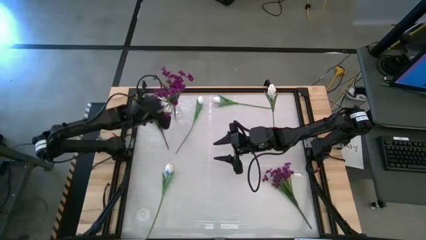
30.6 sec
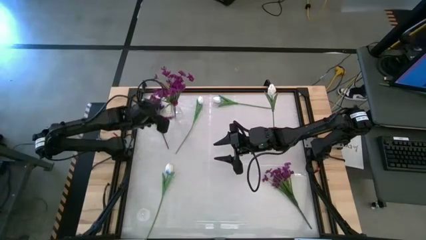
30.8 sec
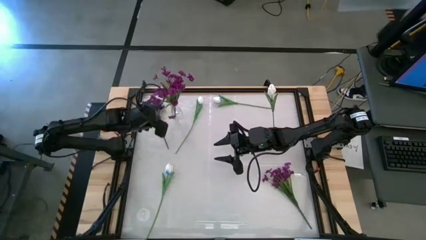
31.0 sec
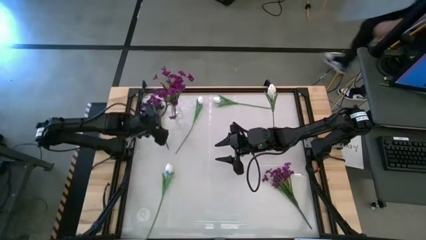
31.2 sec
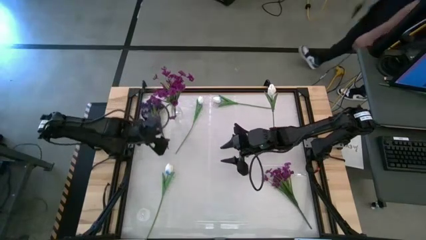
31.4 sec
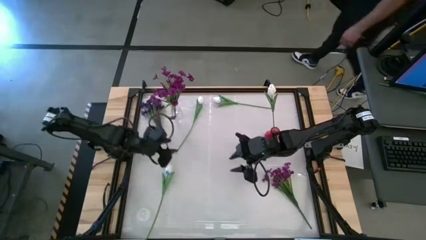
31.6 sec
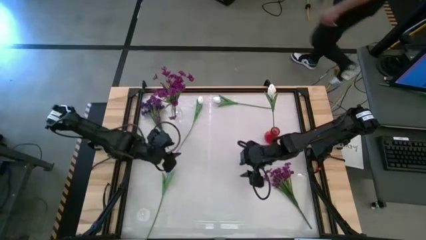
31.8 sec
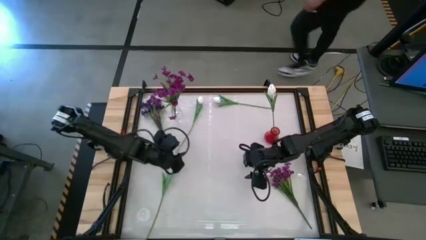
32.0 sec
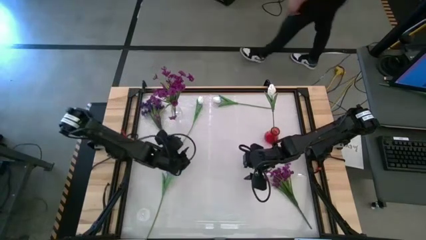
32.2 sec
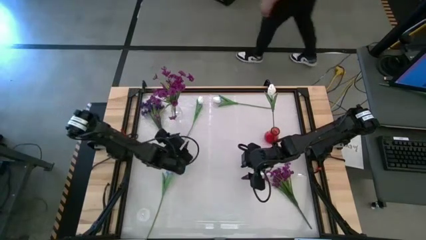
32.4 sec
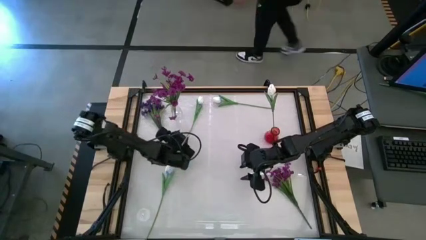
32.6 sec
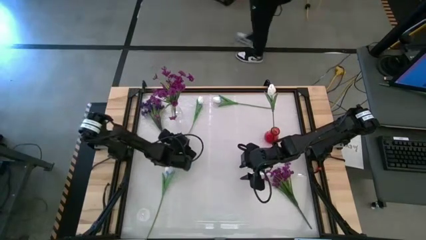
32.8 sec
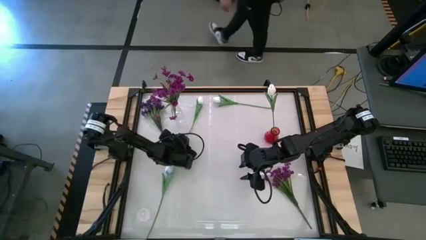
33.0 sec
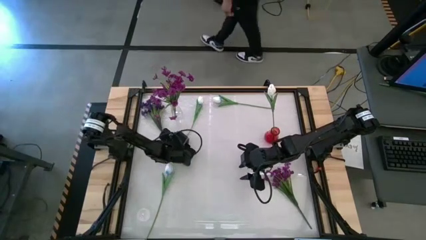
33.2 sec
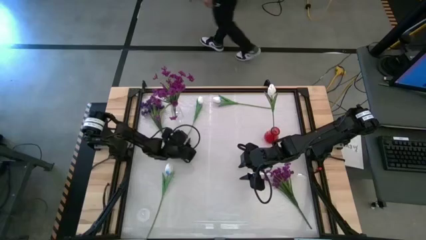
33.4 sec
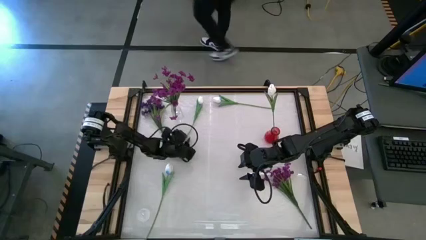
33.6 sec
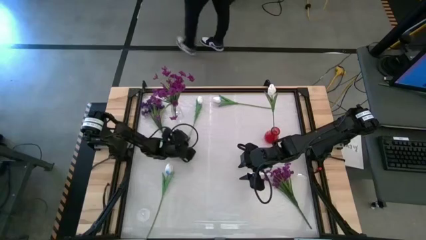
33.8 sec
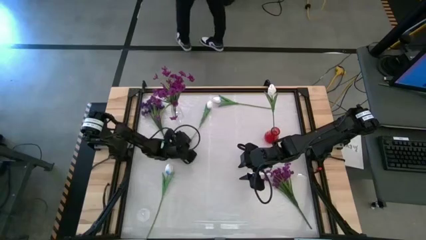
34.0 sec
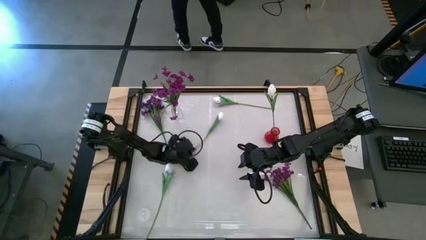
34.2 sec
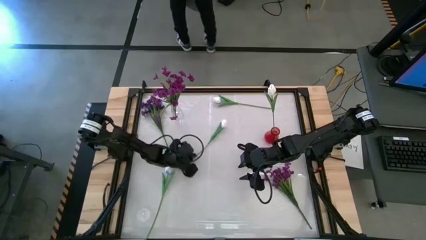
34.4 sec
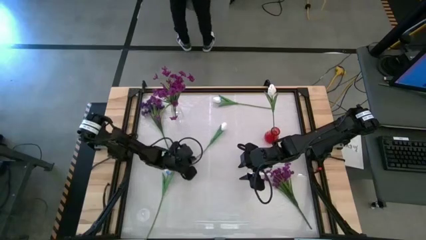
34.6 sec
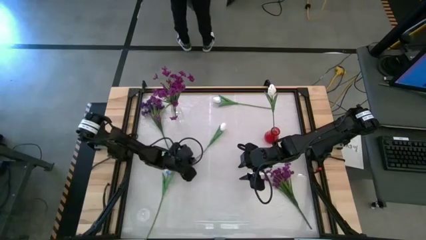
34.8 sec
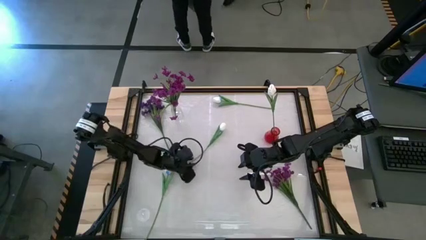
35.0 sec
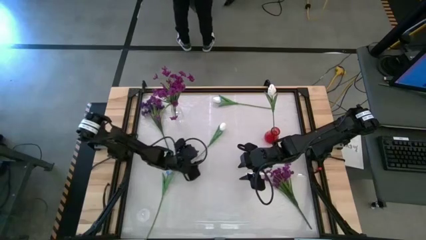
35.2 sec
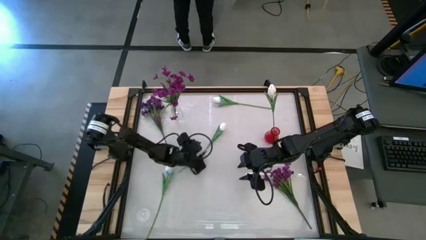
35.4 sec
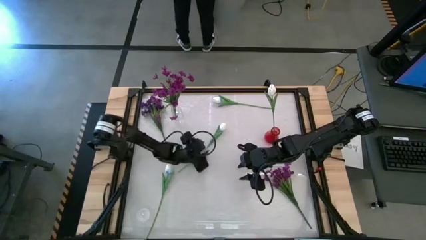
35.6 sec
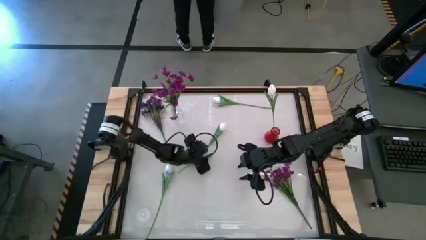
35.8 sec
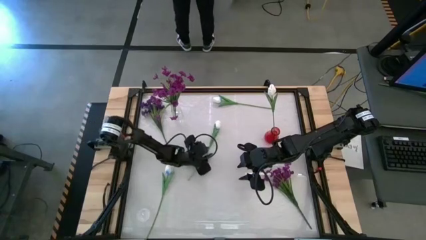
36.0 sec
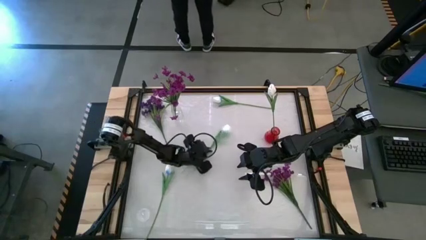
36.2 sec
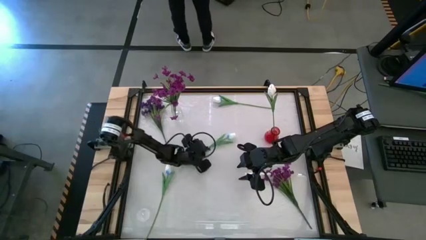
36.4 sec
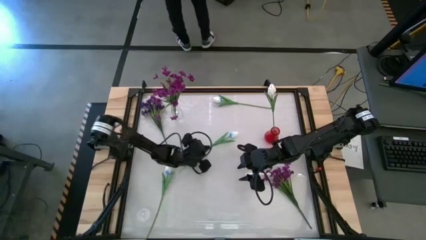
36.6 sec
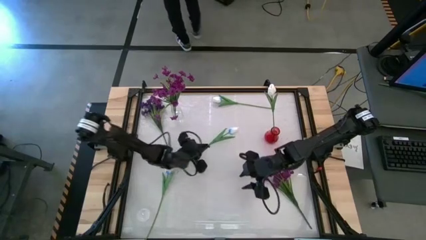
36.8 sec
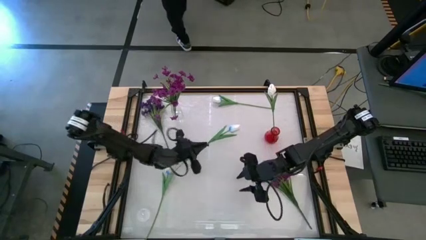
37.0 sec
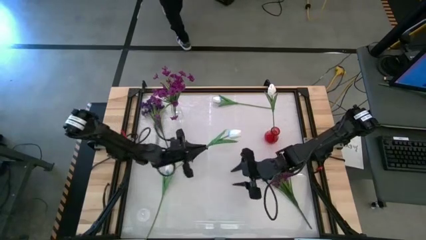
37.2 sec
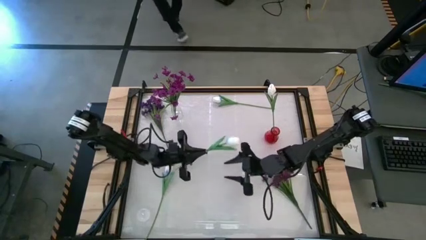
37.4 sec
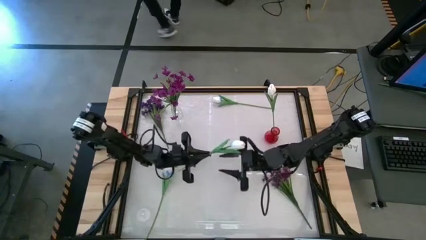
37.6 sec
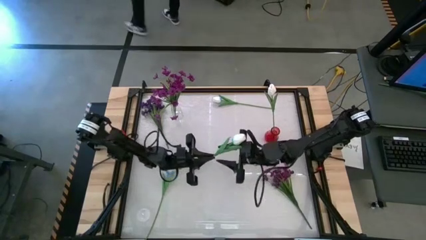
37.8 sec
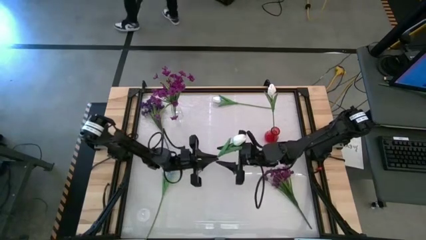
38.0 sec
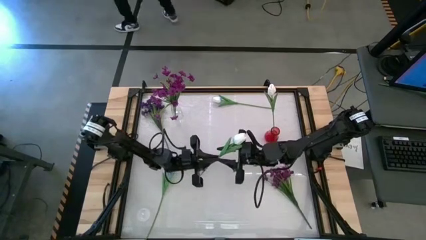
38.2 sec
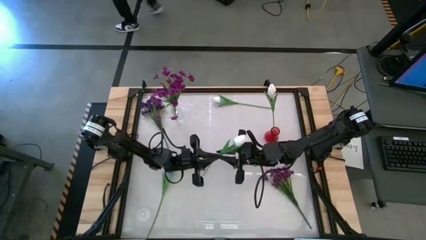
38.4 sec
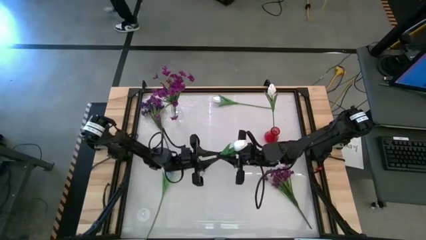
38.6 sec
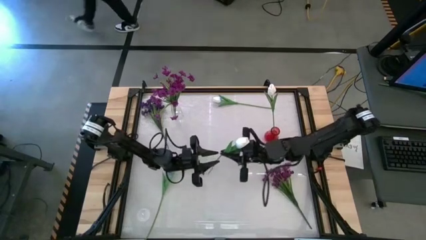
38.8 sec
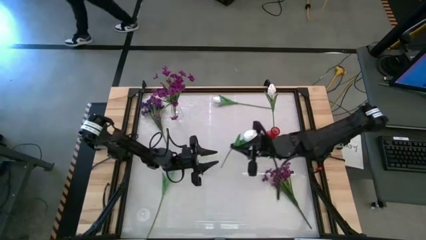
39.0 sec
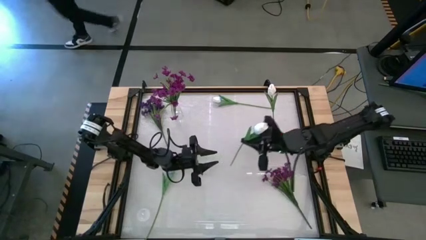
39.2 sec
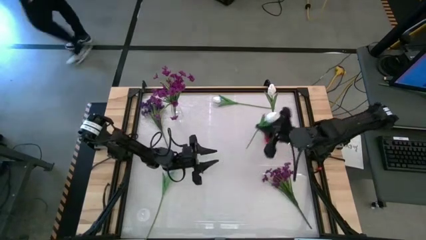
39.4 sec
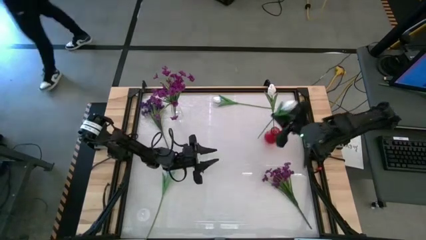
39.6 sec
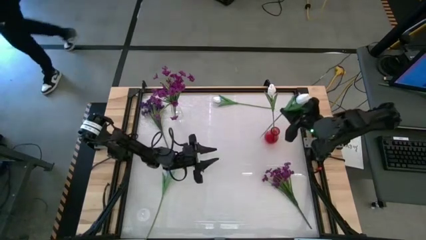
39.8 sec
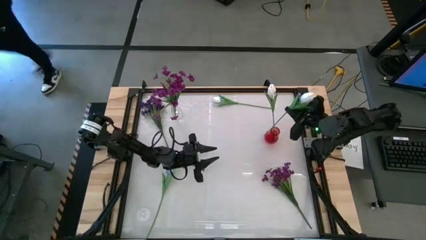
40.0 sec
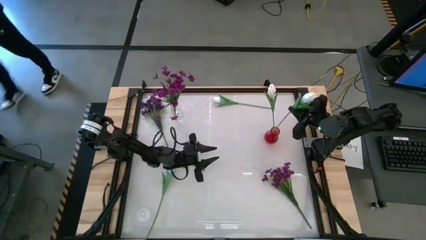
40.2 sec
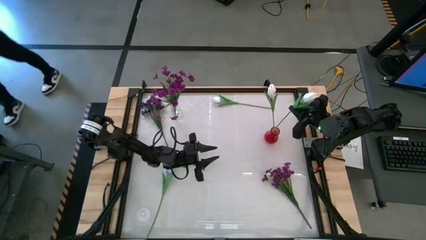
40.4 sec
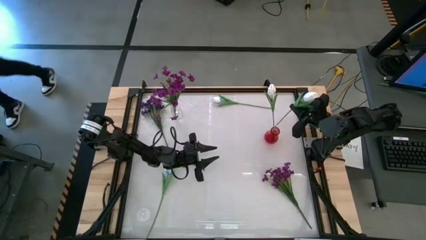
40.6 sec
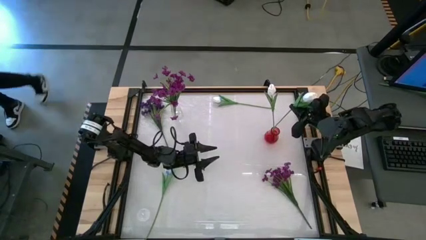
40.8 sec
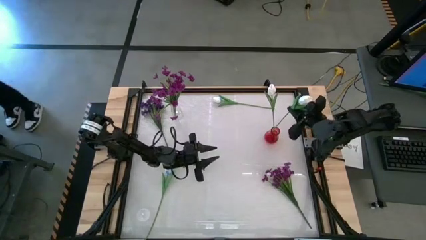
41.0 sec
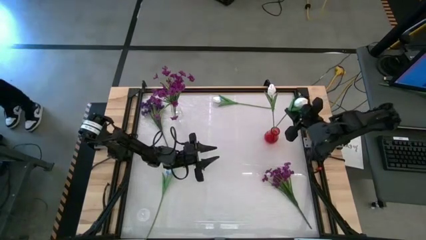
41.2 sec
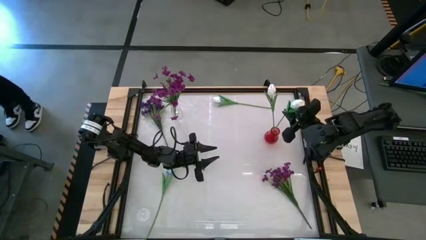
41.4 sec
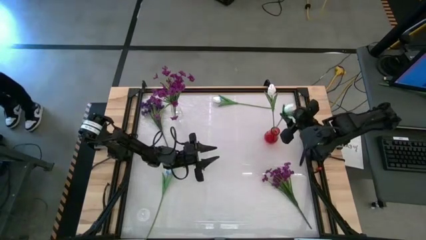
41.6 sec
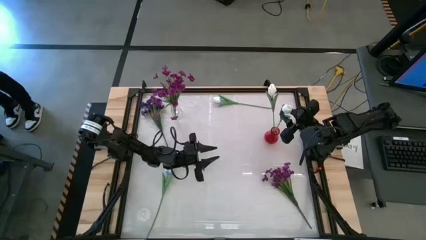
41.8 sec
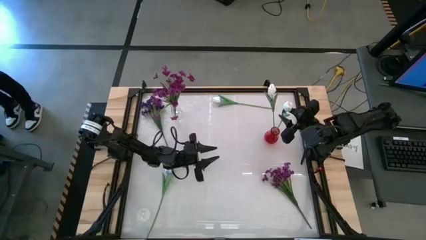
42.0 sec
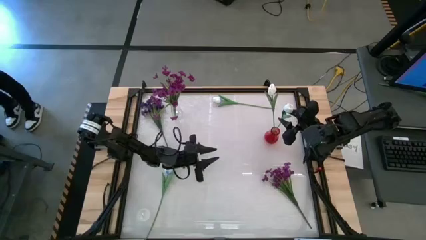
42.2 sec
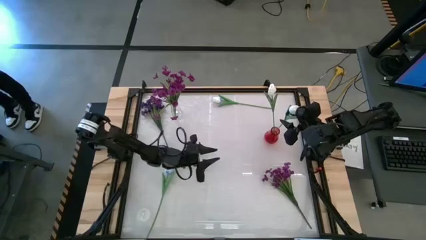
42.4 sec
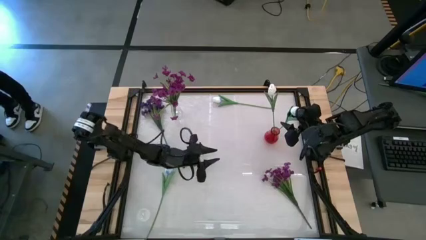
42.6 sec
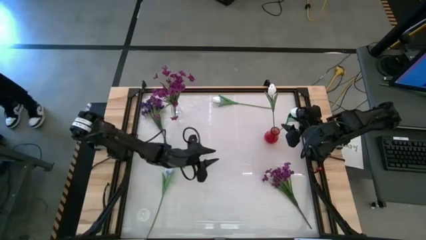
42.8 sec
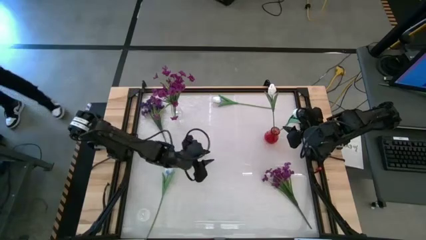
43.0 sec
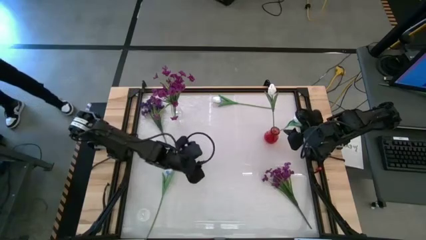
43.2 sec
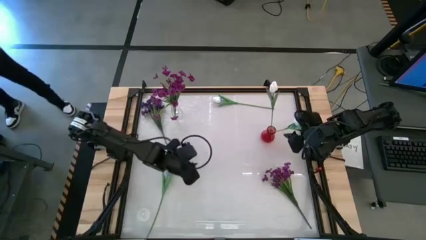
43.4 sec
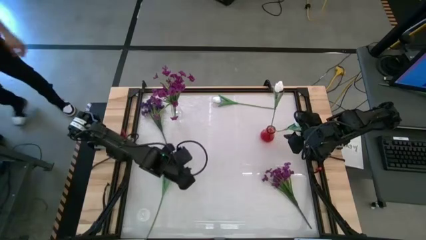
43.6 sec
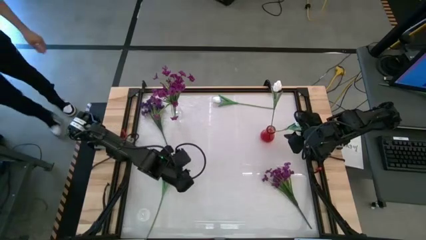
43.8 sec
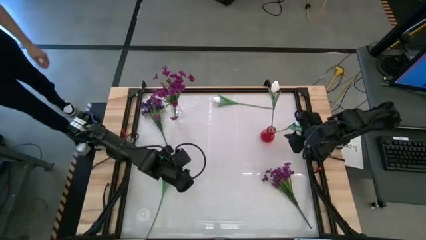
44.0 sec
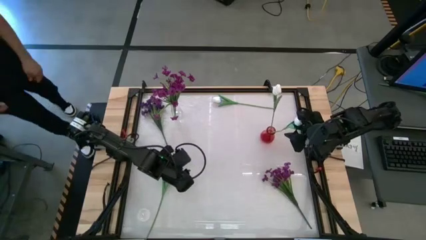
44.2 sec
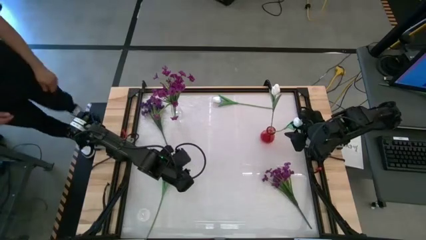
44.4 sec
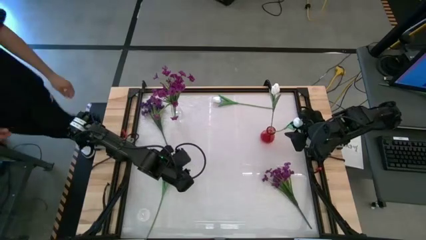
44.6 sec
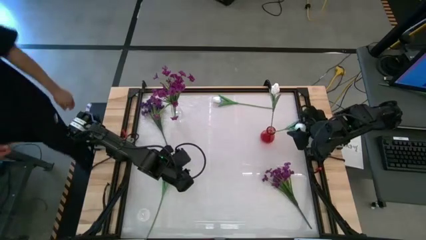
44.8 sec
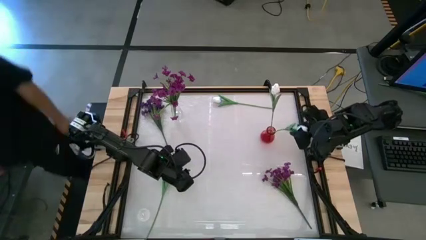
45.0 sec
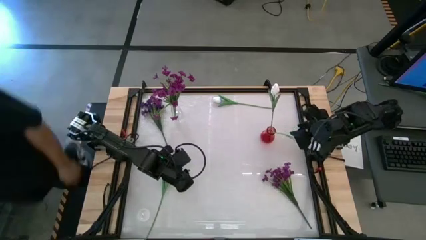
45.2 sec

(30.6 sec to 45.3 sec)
Task: Sort flowers into vase by color
Put the middle left white tulip into the red vase

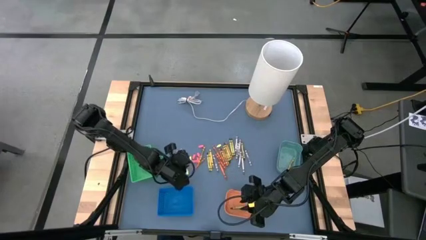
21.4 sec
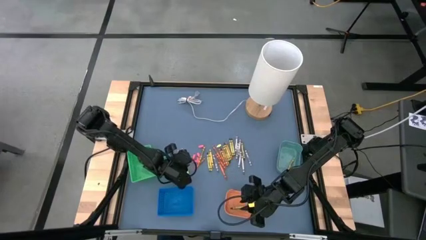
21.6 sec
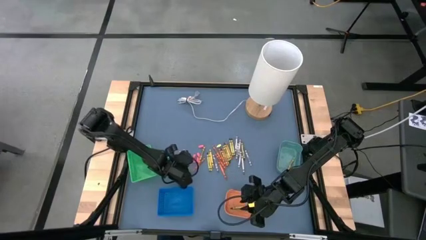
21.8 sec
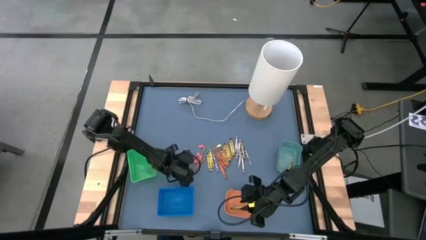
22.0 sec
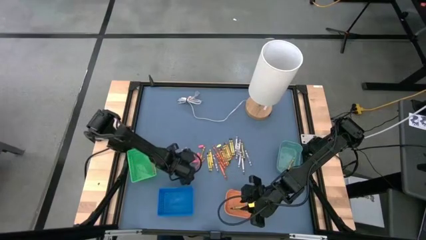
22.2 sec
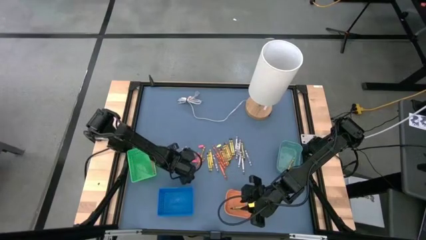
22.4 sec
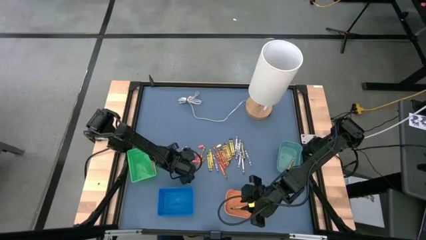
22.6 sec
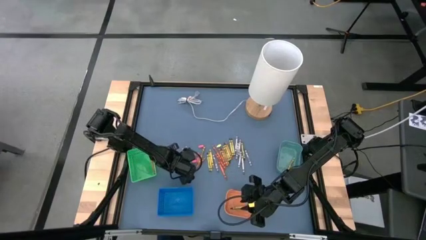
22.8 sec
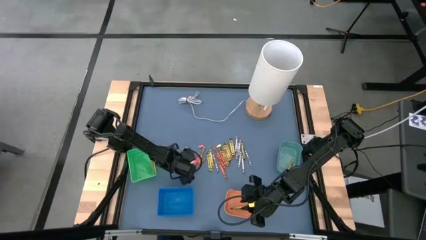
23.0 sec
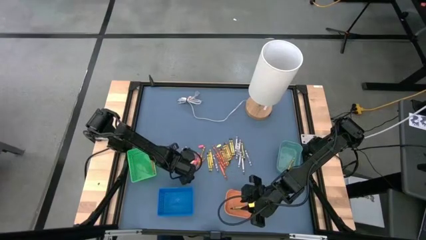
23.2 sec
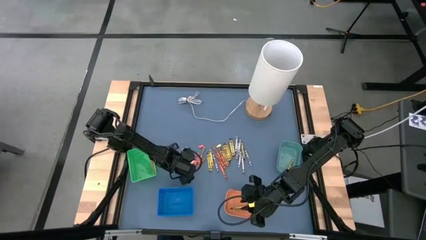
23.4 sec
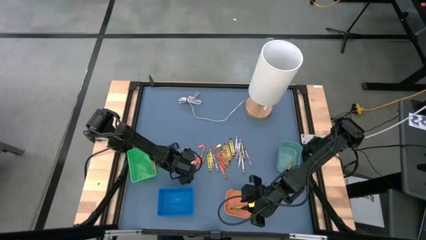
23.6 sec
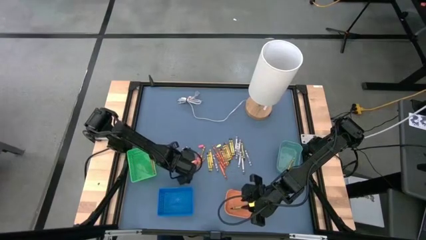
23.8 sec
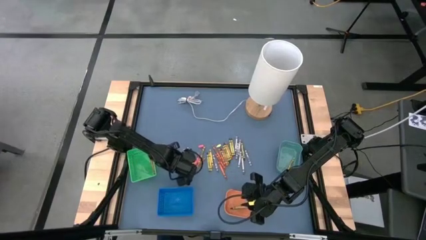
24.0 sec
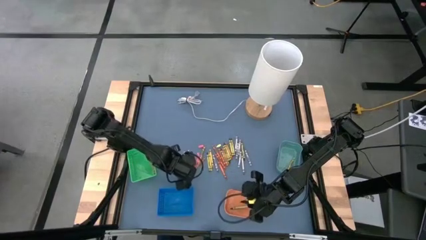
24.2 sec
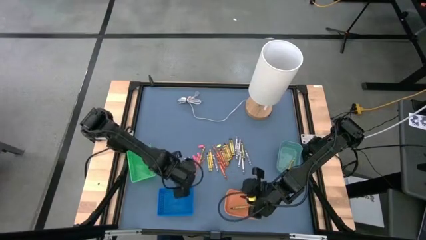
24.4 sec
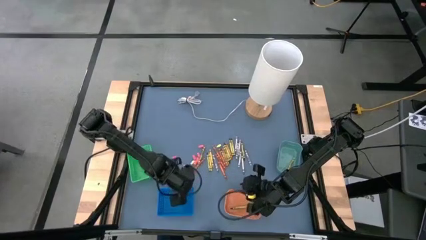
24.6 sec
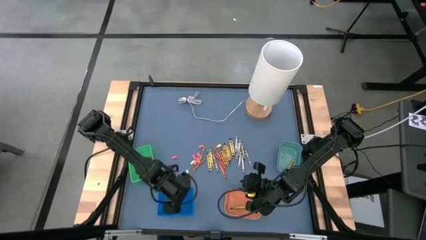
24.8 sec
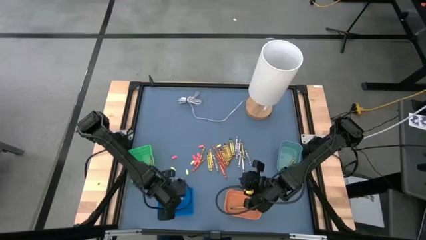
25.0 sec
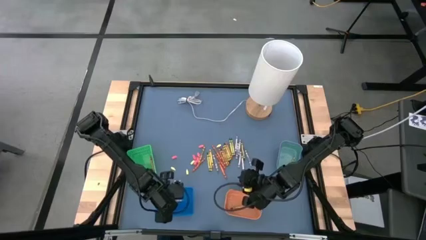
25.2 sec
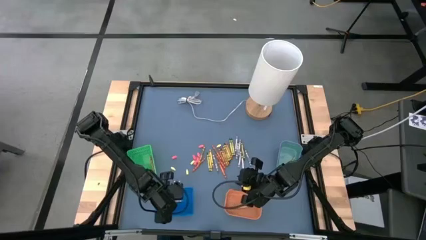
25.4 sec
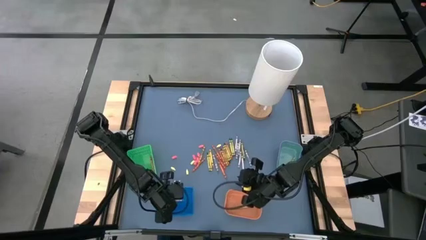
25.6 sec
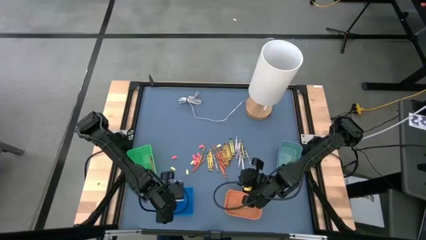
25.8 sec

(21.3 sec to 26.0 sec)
Task: Sort crayons
Put the gray crayon into the blue bin
